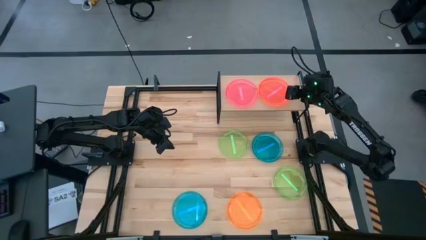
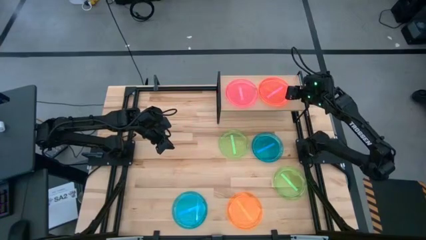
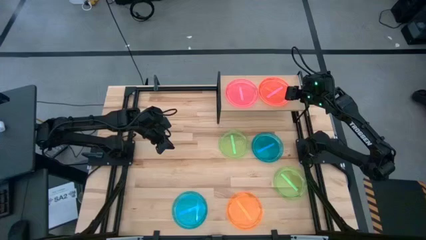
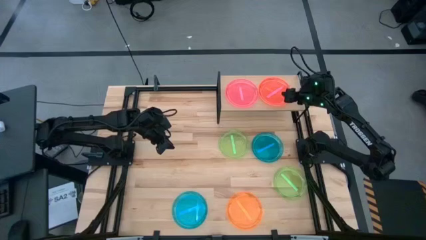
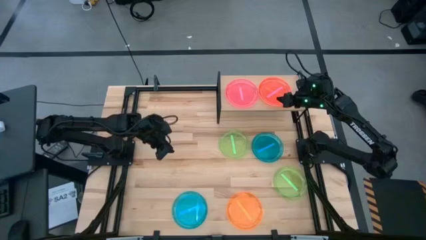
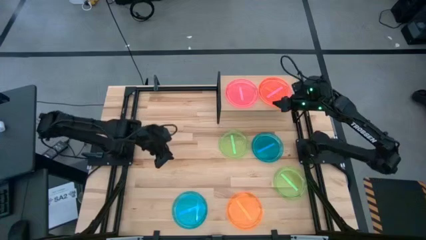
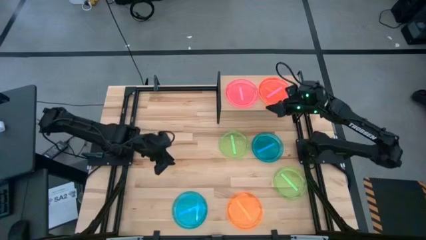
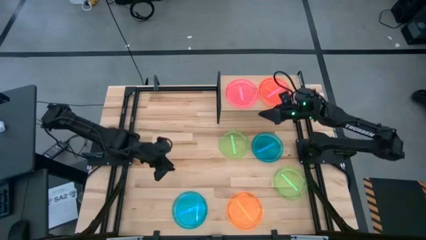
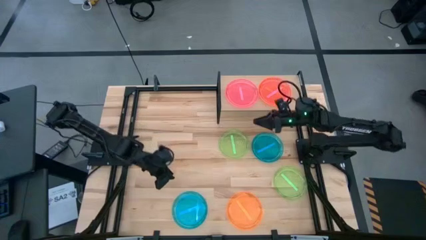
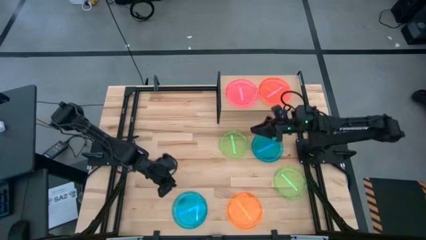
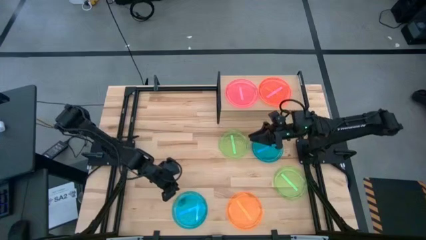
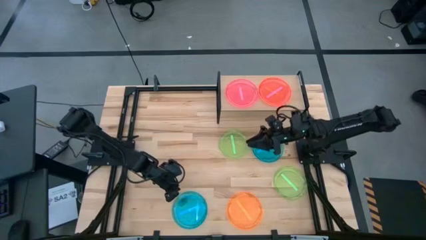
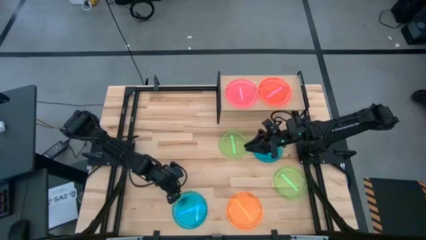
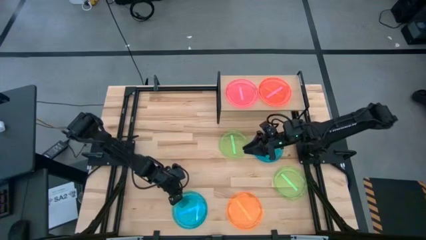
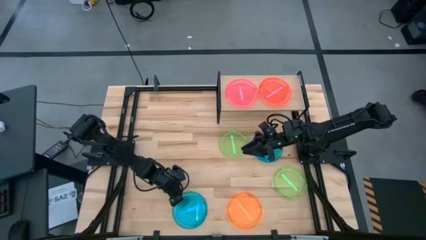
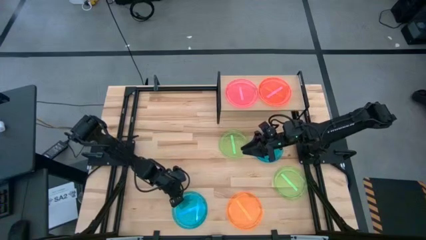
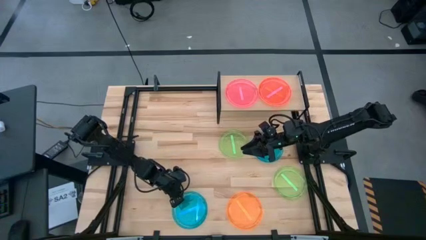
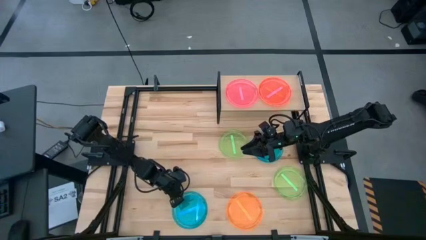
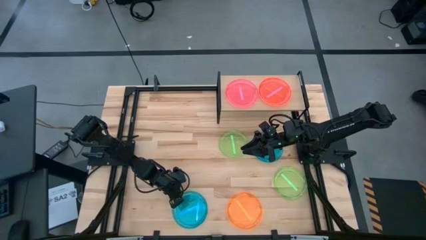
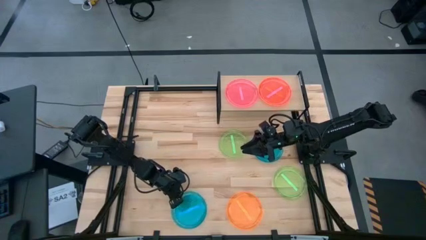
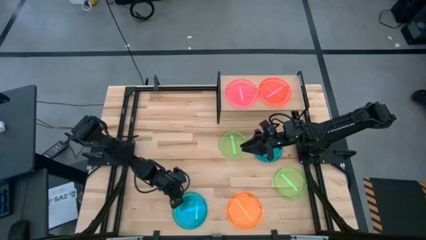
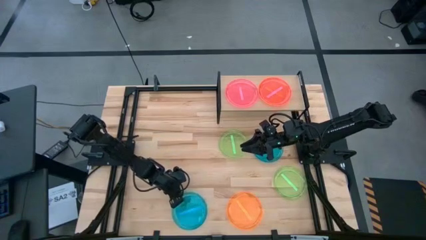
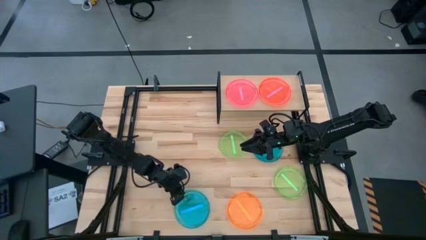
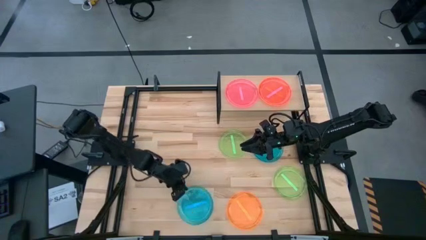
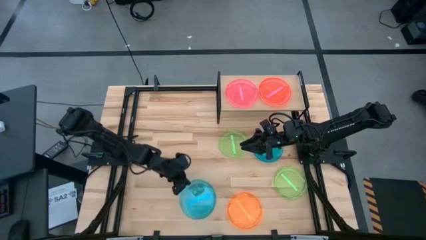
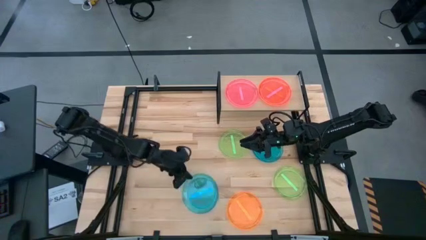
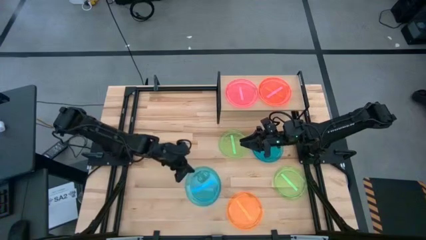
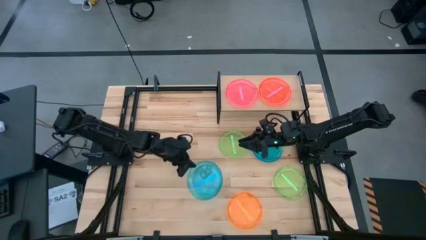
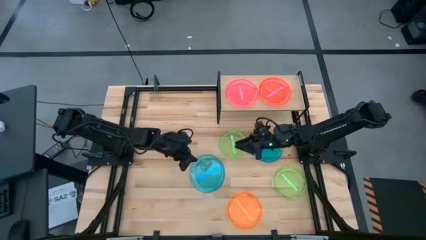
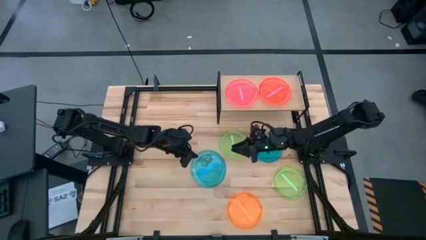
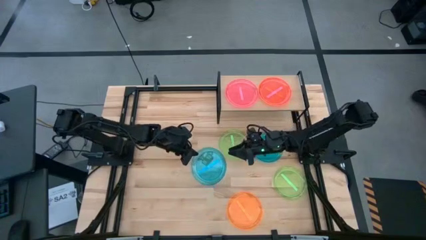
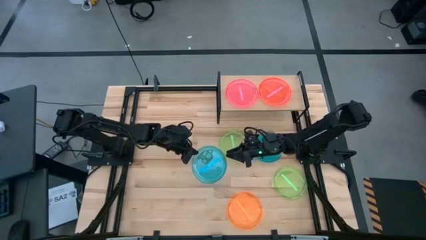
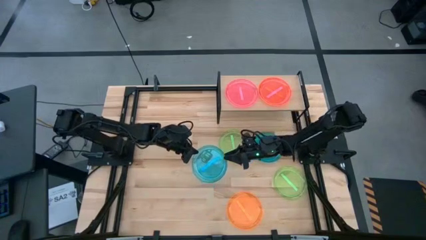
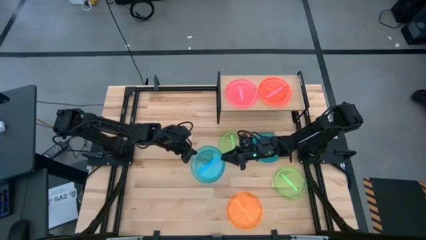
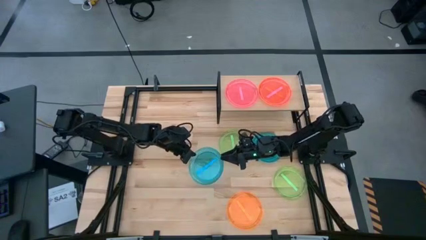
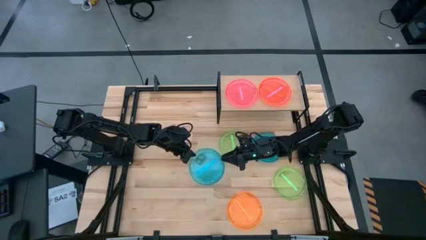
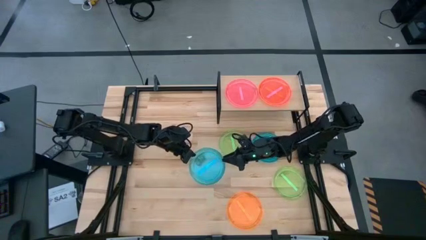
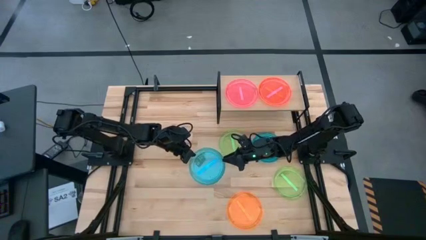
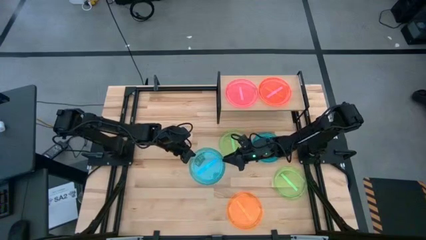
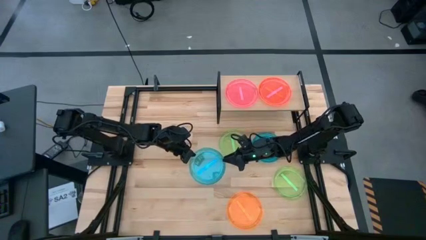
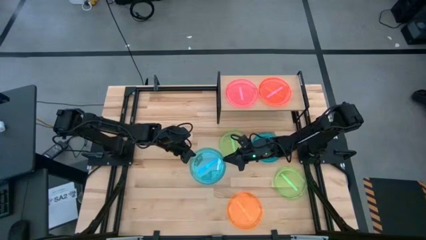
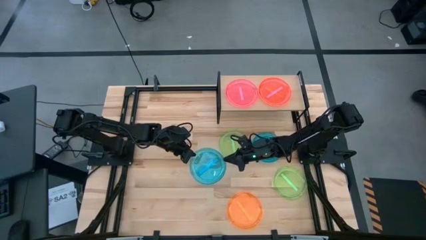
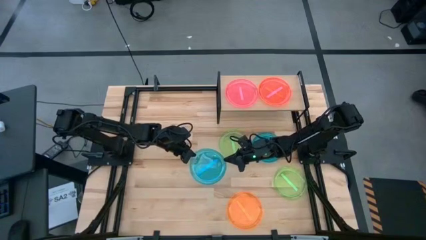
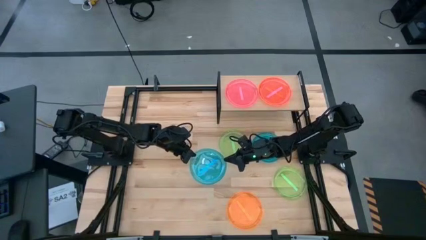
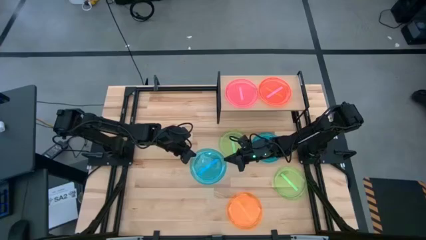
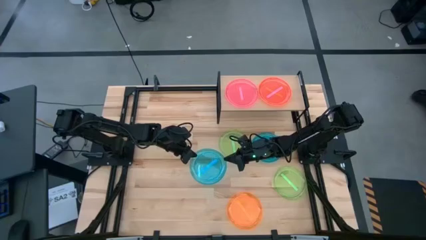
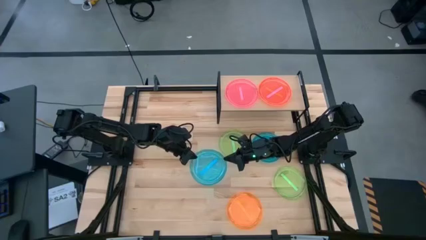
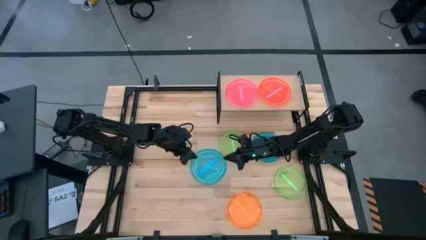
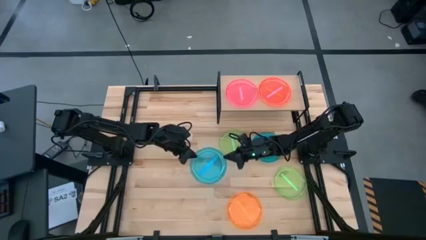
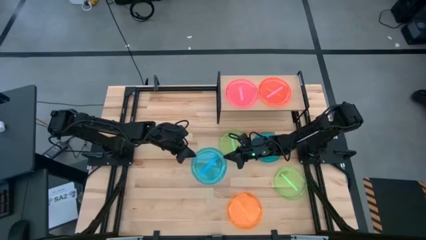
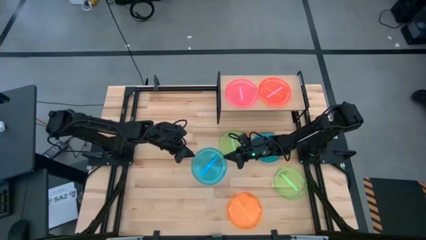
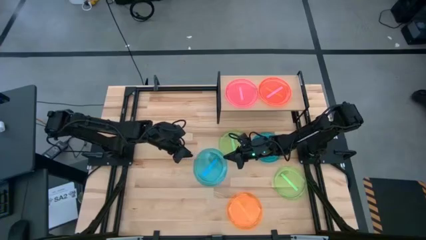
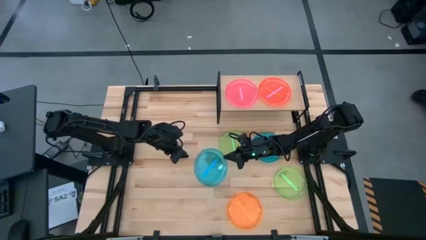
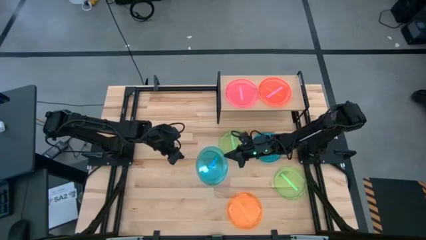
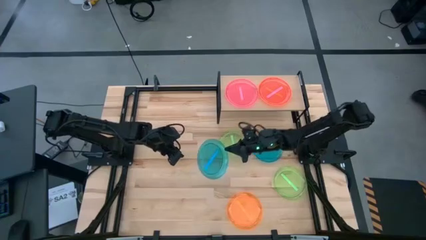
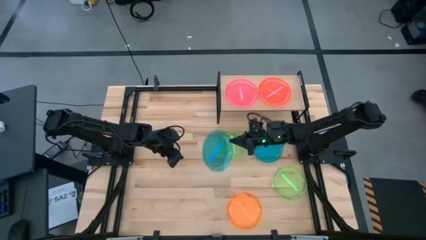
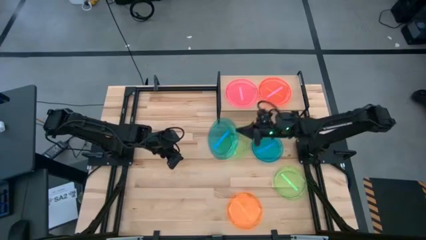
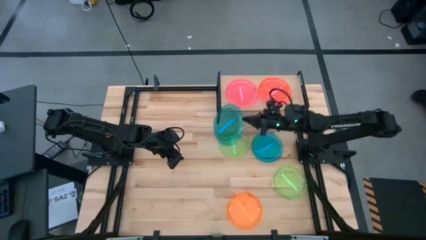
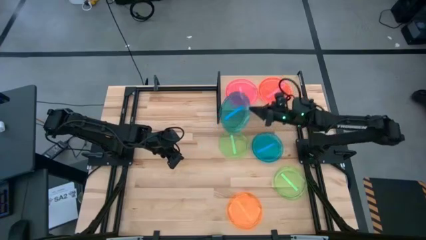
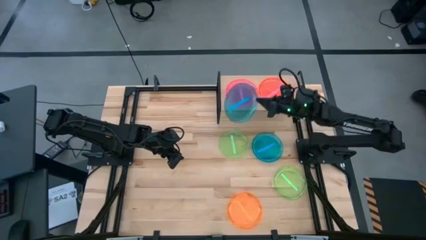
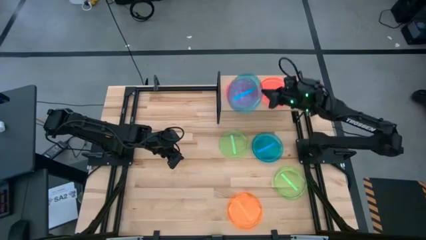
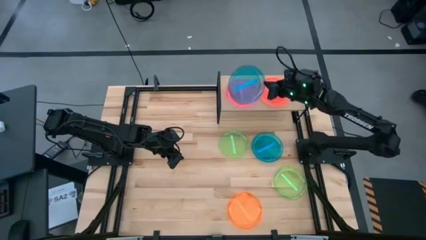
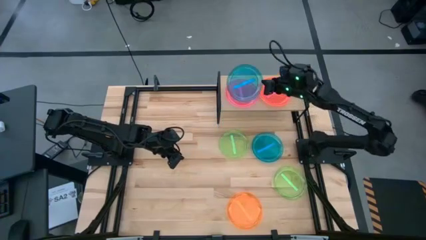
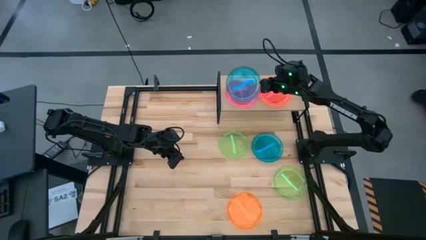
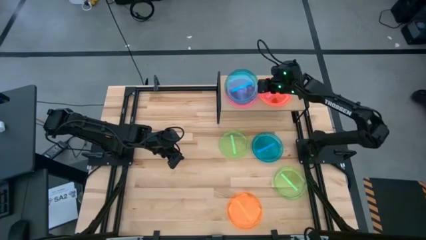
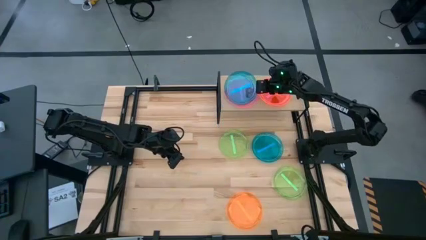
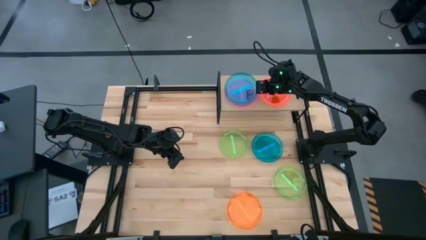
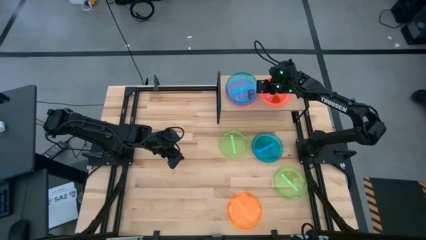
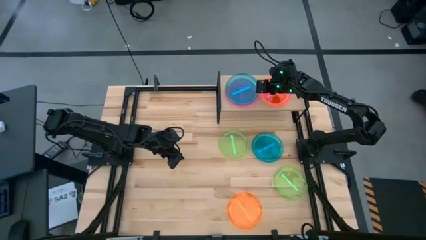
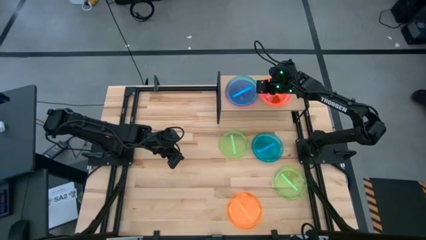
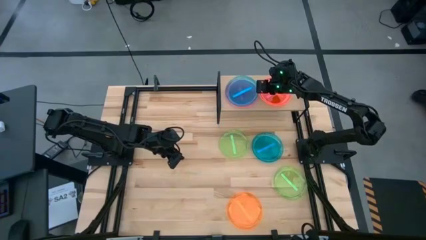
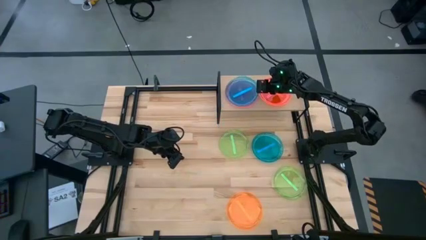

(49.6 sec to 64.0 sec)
Task: Place and stack plates onto a shelf
Stack the bottom blue plate on top of the pink plate on the shelf
